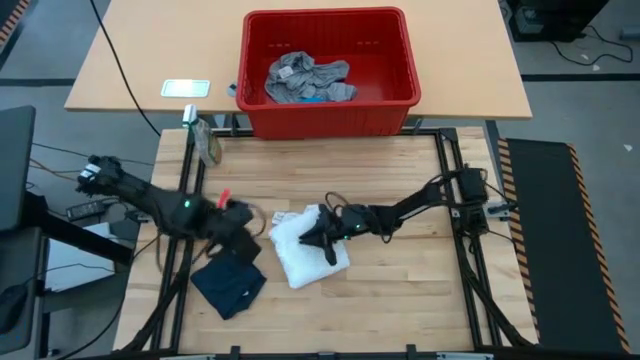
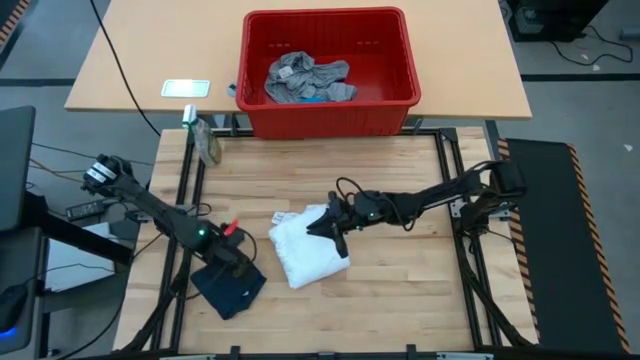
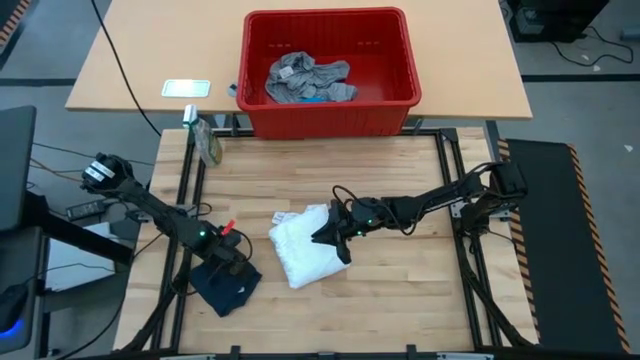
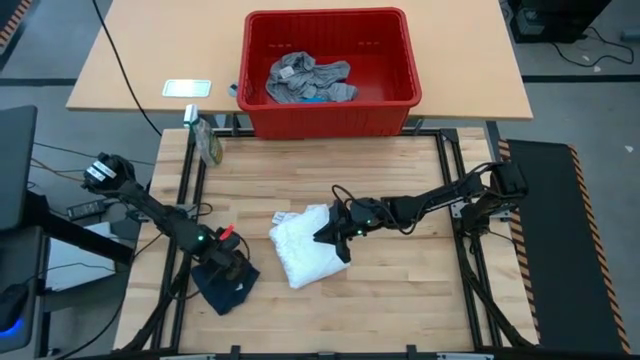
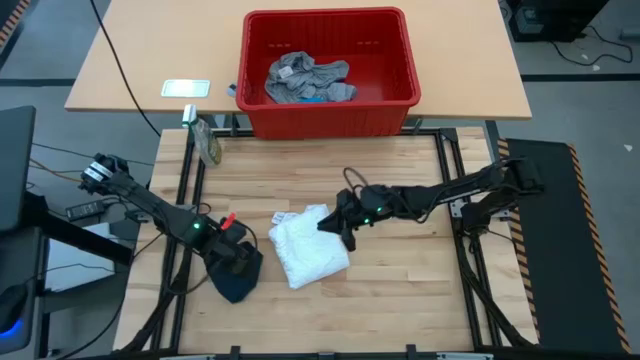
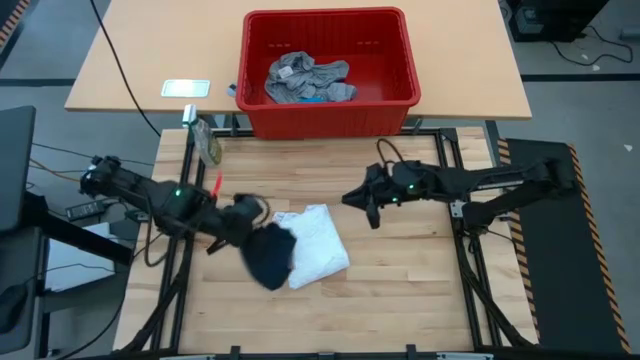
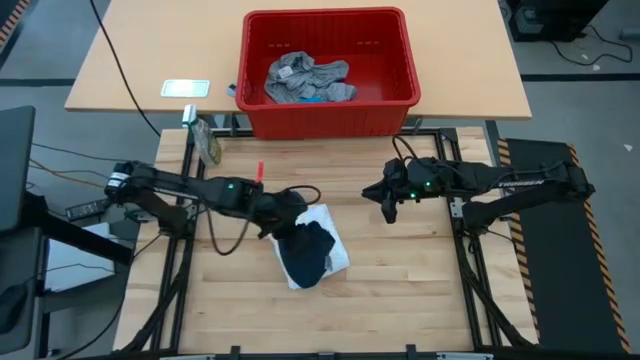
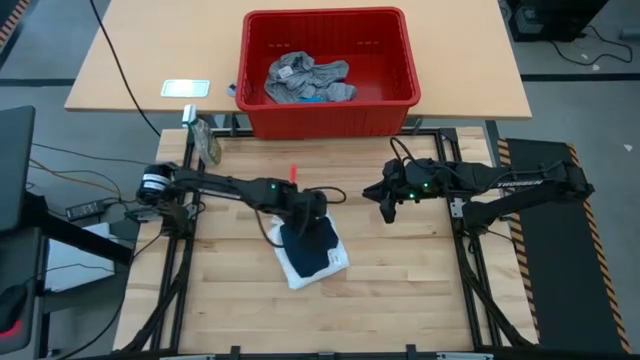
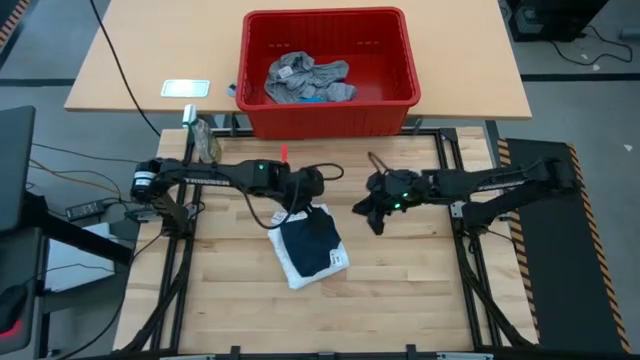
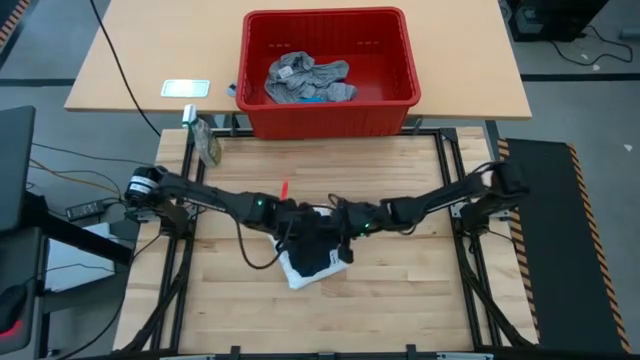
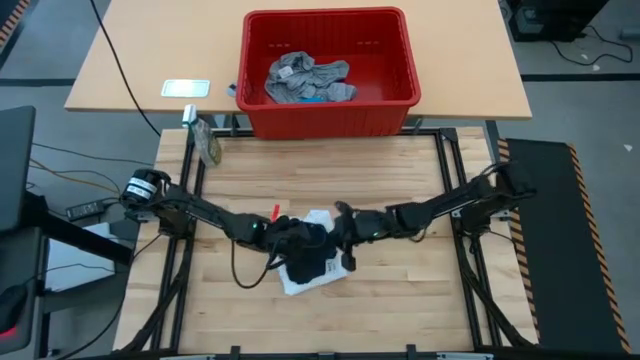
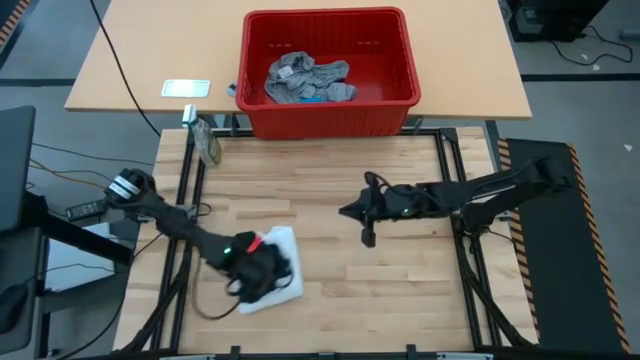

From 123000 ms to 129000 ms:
Task: Fold laundry
Stack the blue shorts on top of the white dress

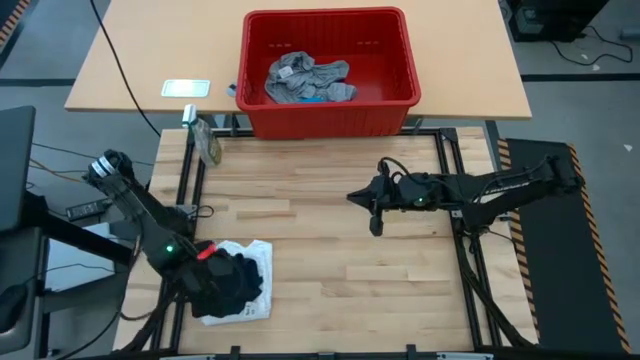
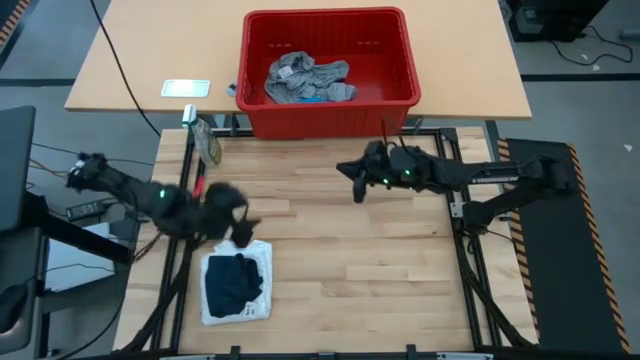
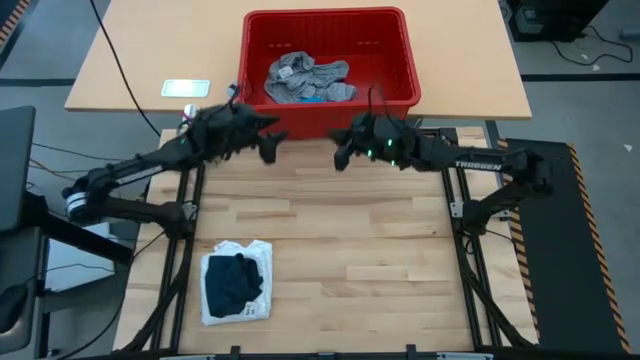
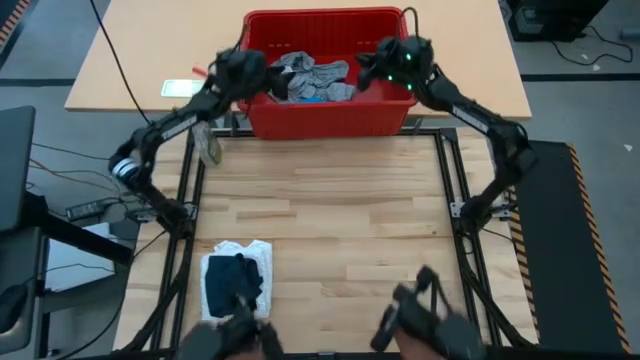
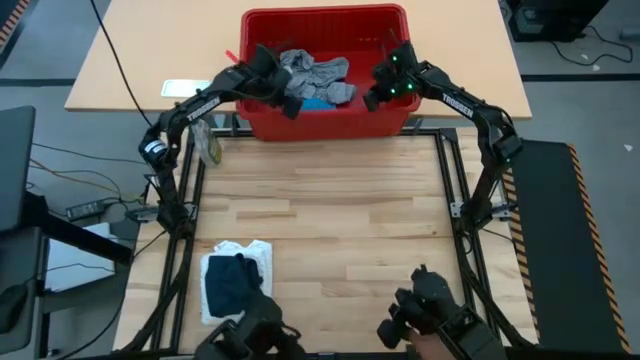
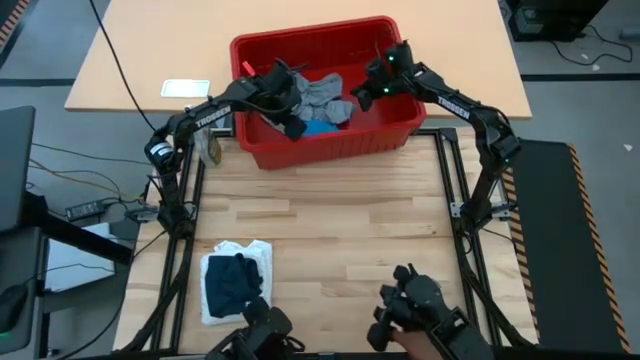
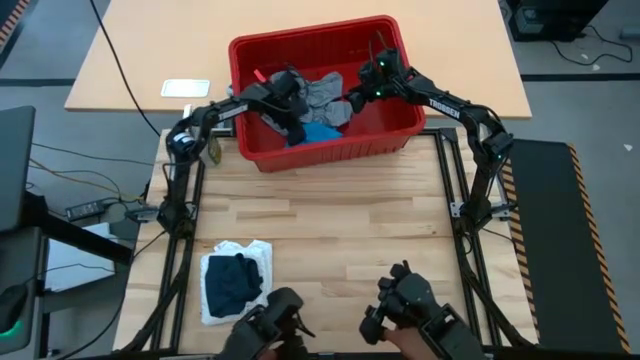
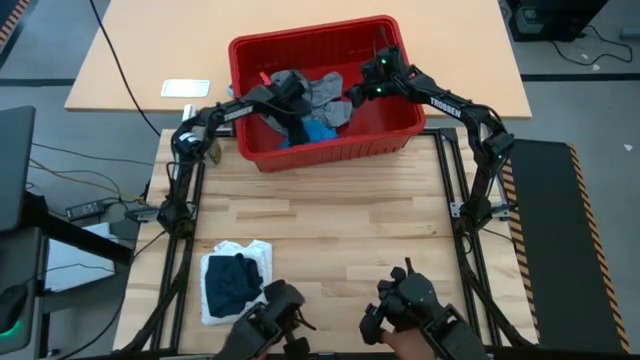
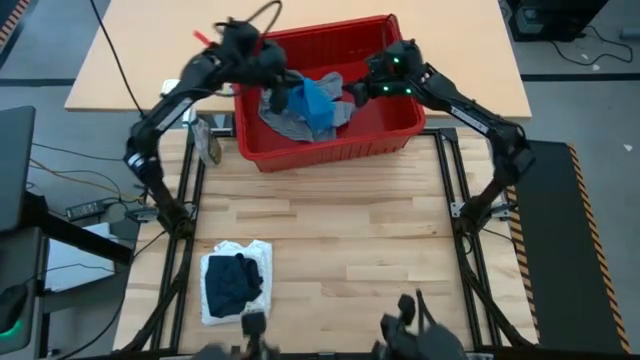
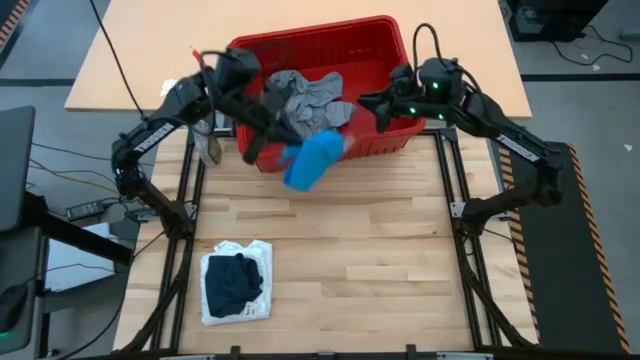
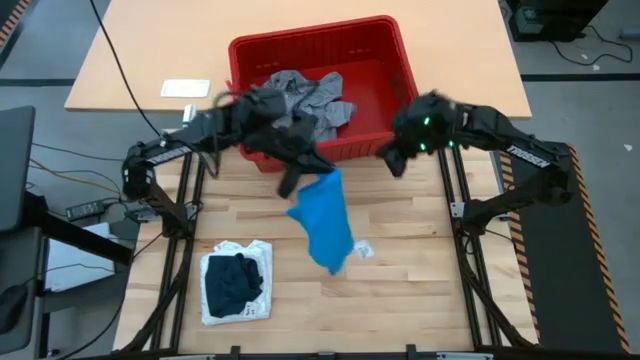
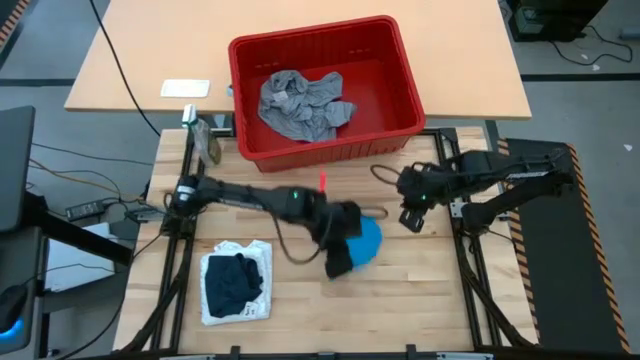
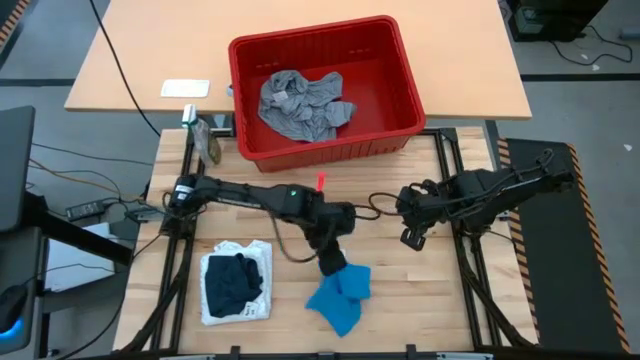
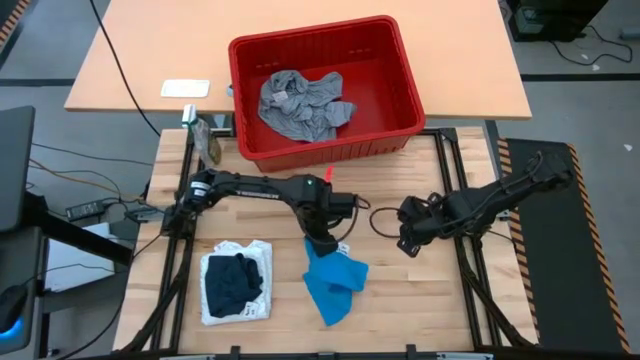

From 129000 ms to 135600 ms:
Remove the light blue shorts from the red laundry bin

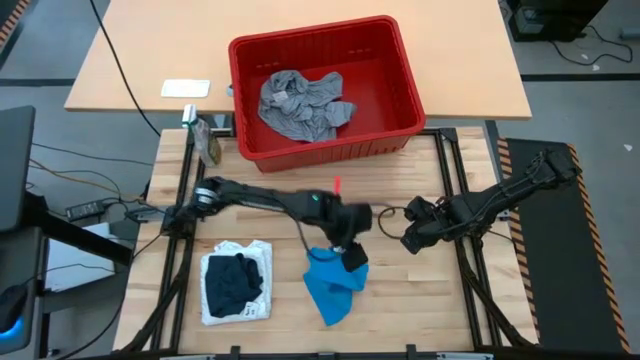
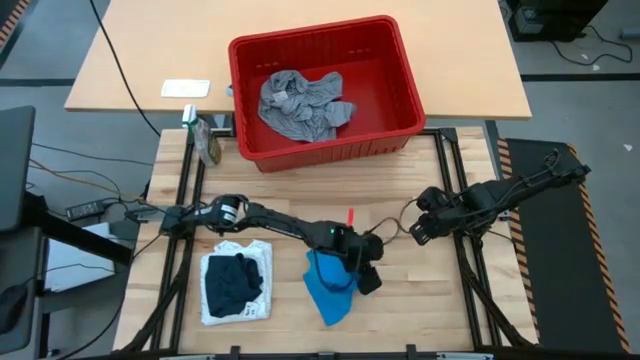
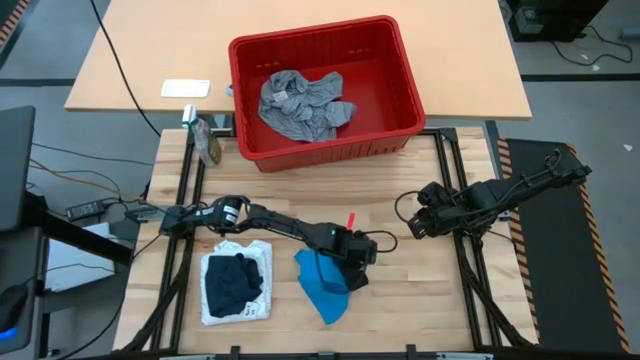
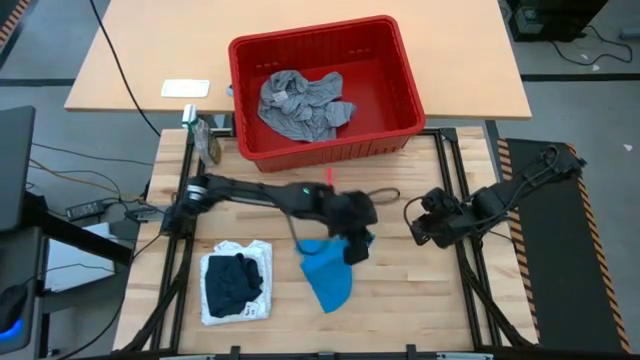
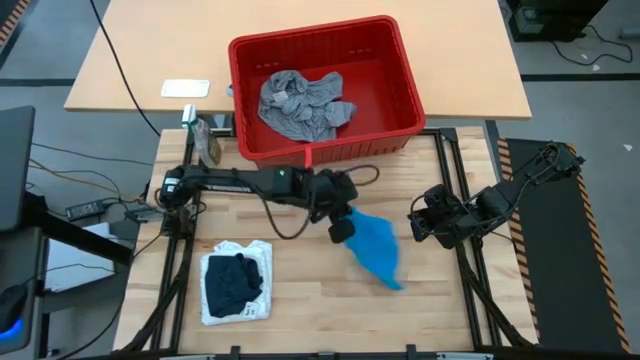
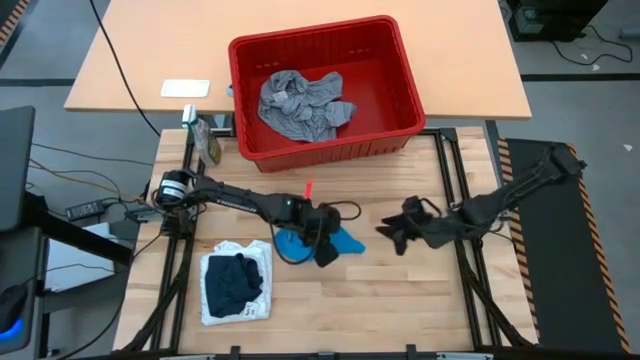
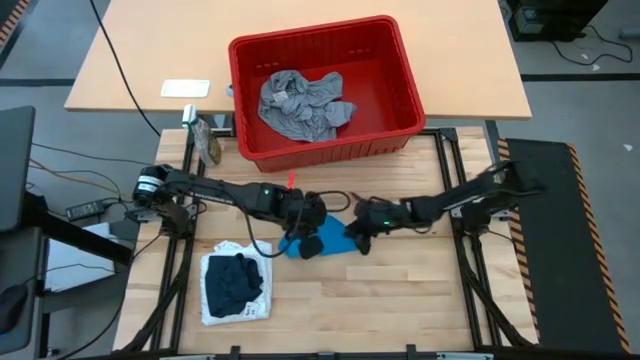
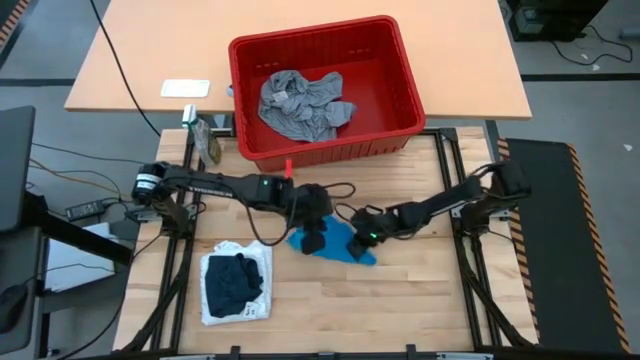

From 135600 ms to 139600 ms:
Fold the light blue shorts

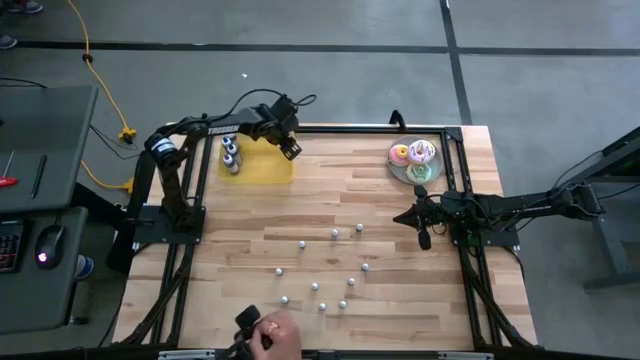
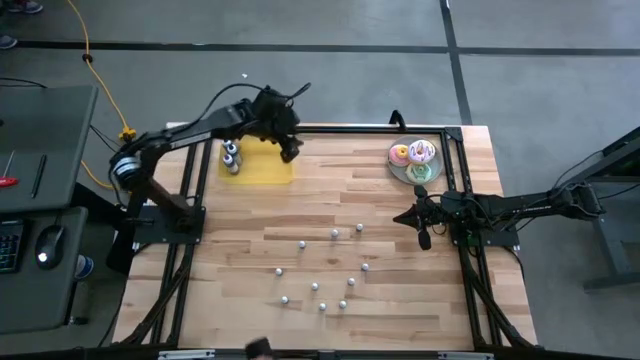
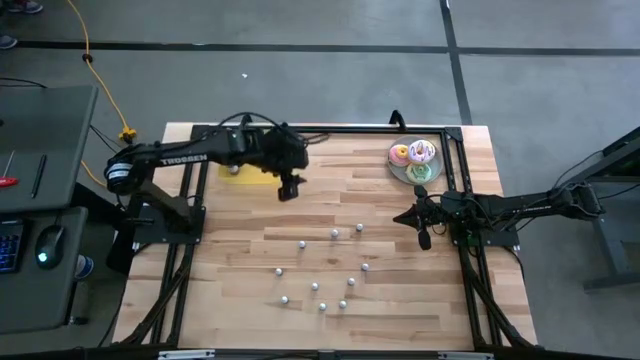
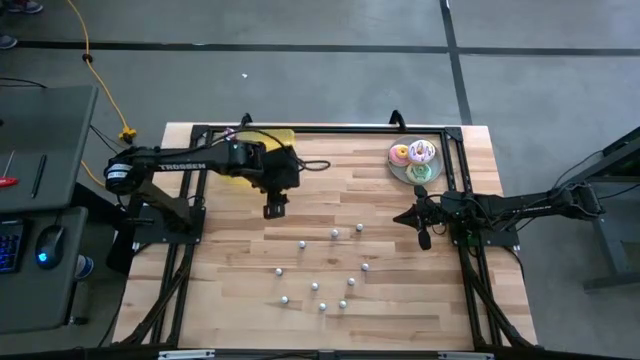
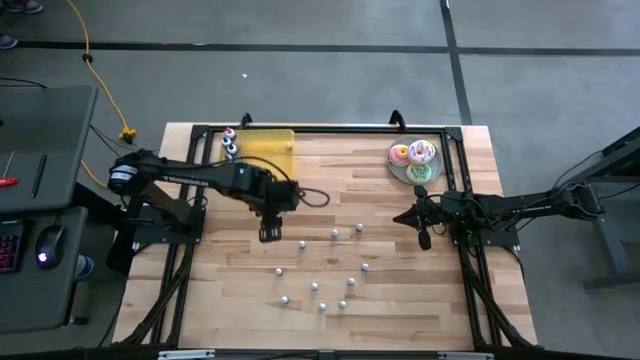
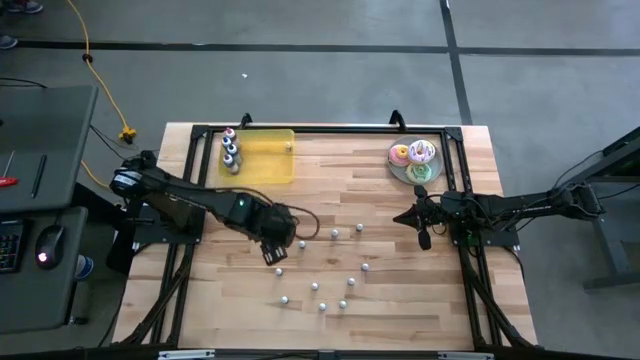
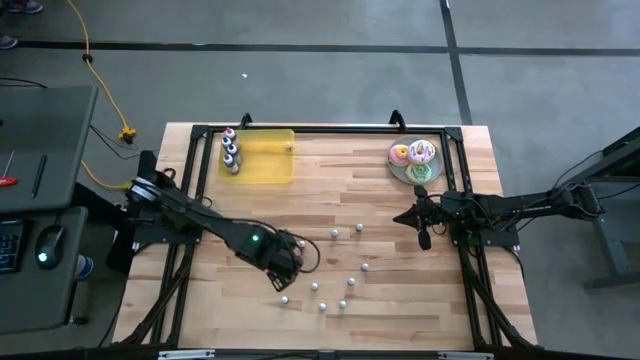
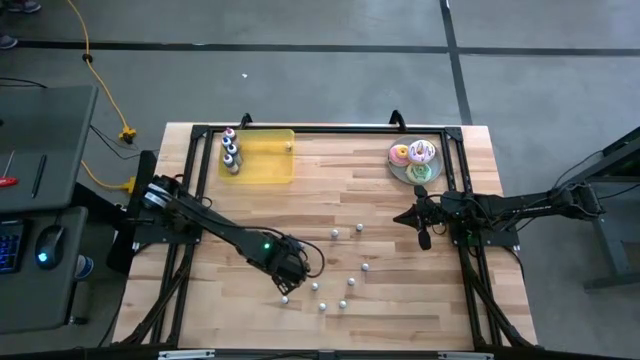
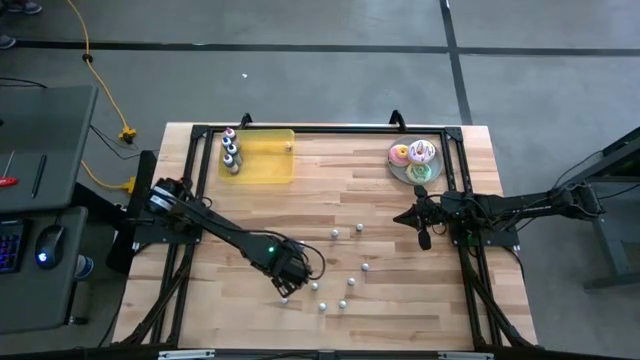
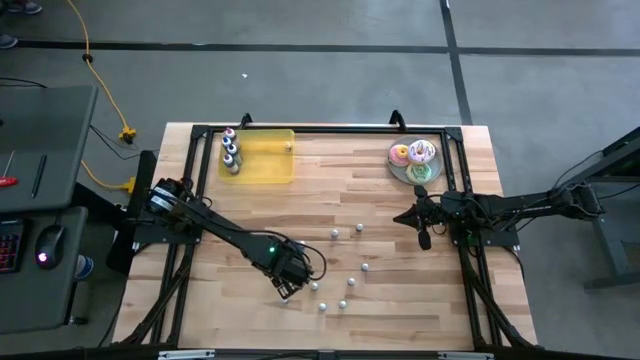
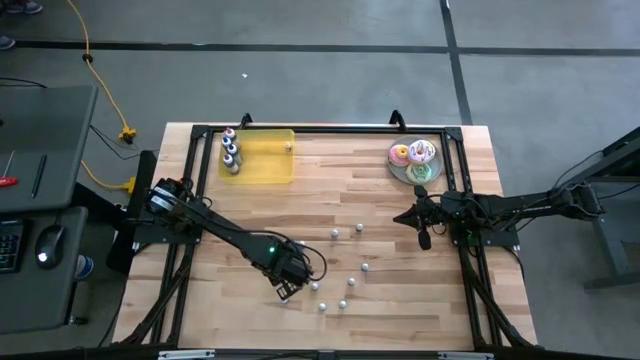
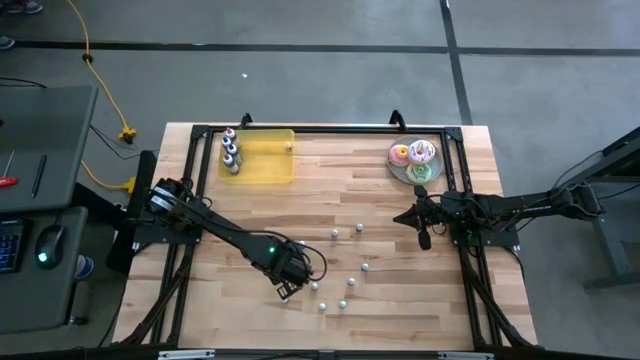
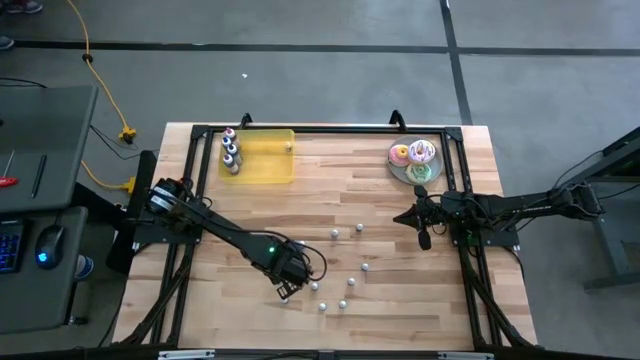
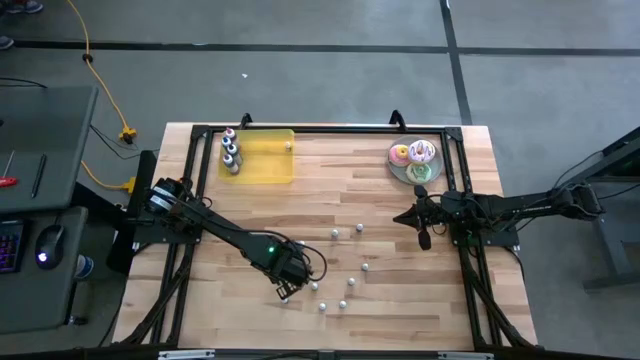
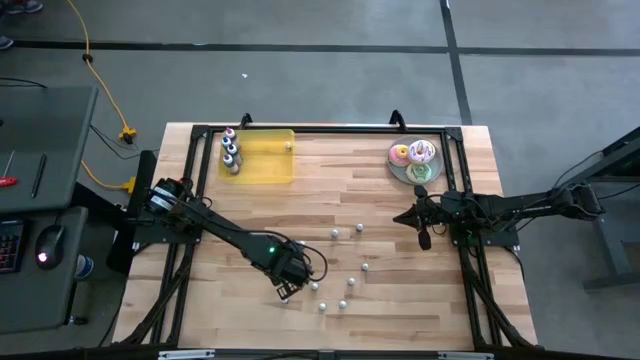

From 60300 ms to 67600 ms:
Task: Pick & Place food coloring
Put the small red food coloring bottle into the yellow bin
